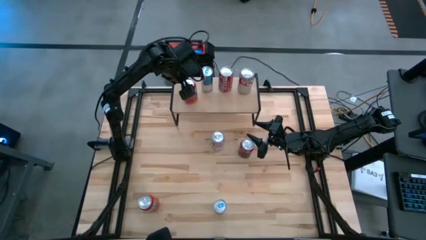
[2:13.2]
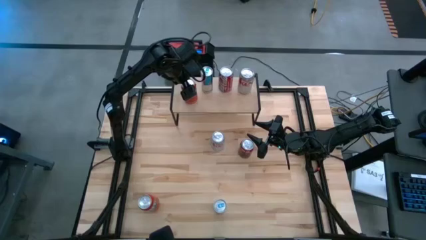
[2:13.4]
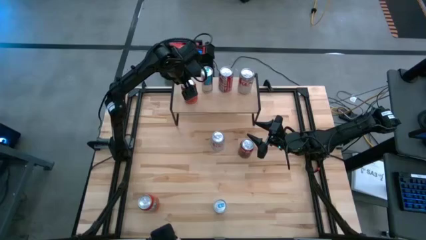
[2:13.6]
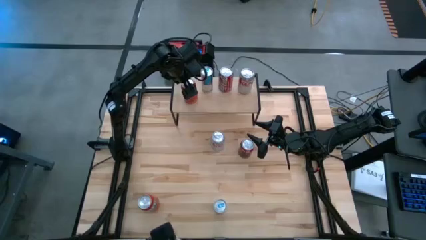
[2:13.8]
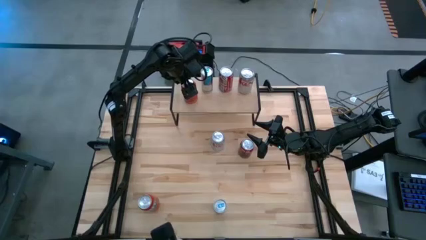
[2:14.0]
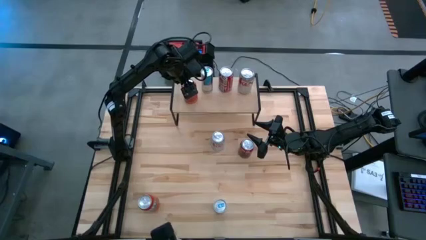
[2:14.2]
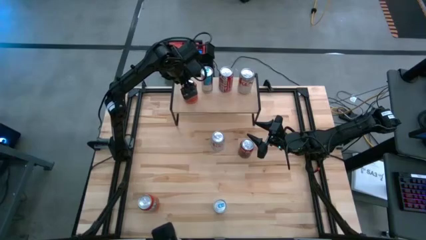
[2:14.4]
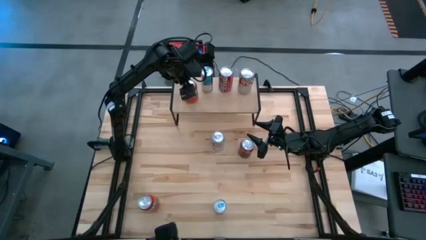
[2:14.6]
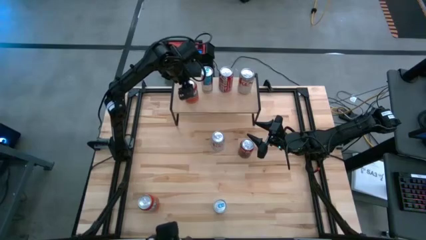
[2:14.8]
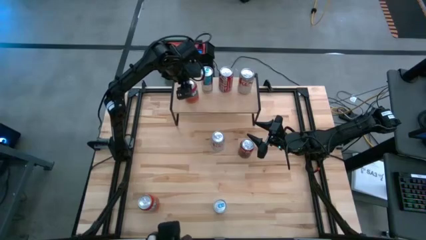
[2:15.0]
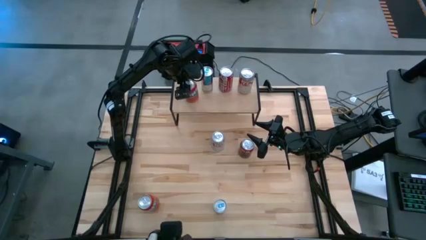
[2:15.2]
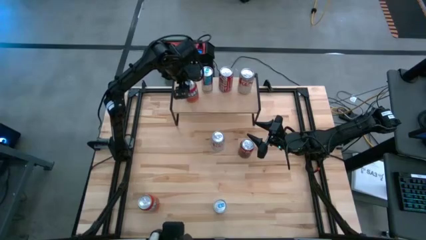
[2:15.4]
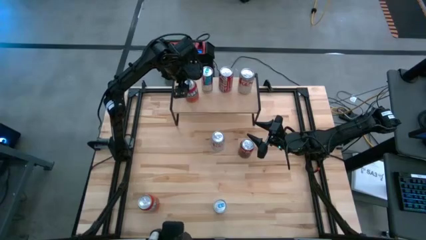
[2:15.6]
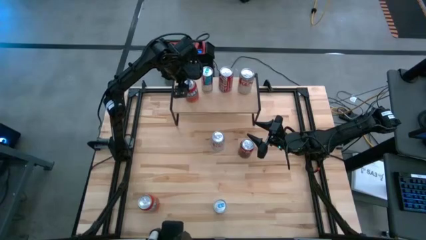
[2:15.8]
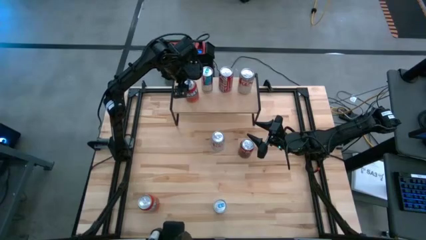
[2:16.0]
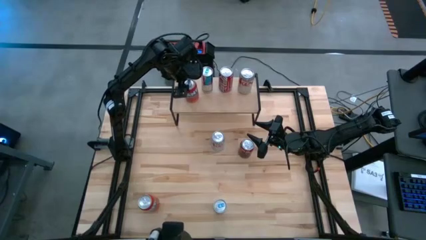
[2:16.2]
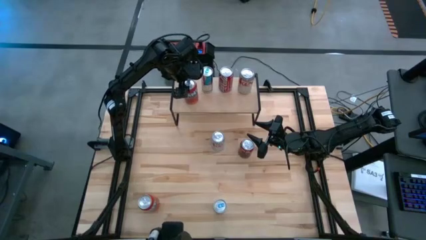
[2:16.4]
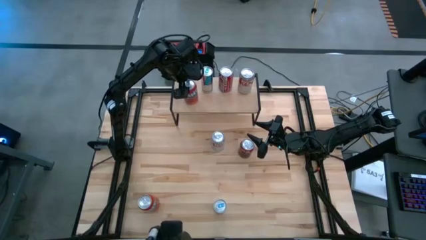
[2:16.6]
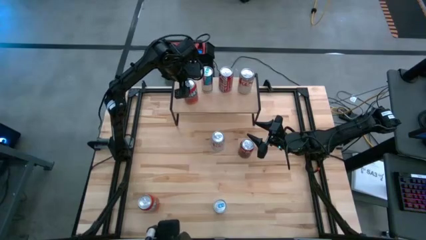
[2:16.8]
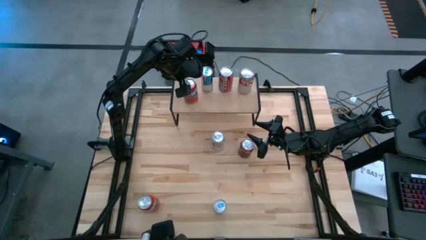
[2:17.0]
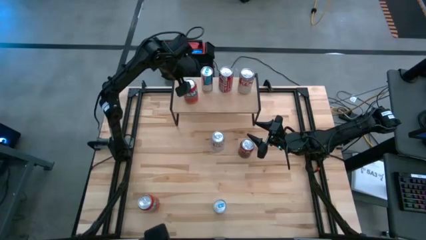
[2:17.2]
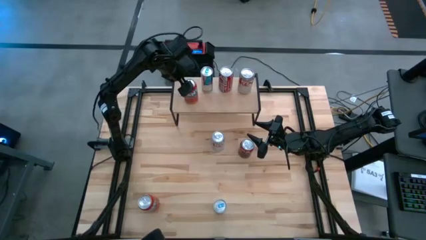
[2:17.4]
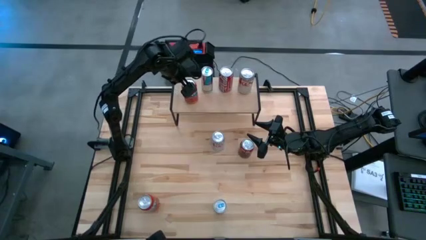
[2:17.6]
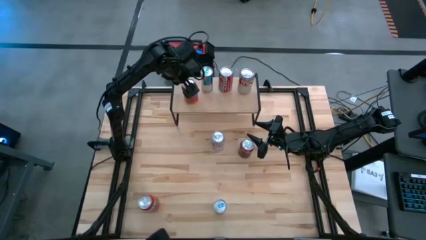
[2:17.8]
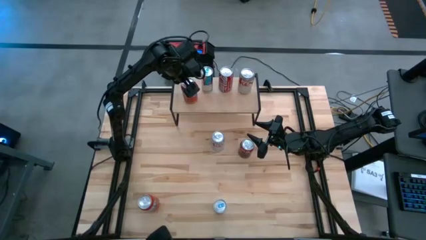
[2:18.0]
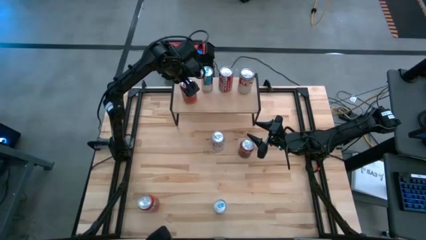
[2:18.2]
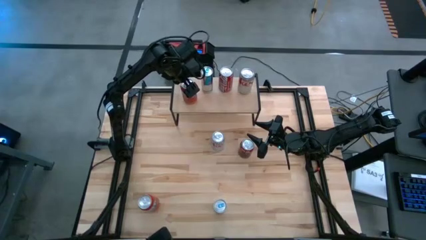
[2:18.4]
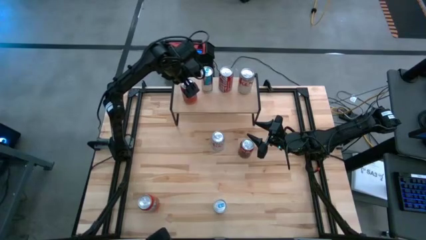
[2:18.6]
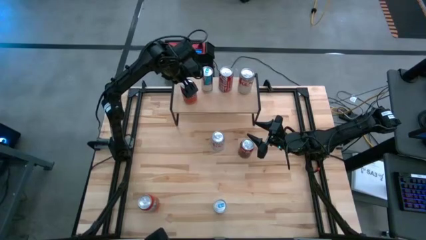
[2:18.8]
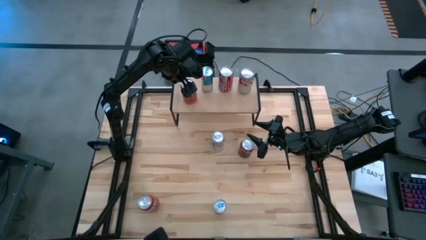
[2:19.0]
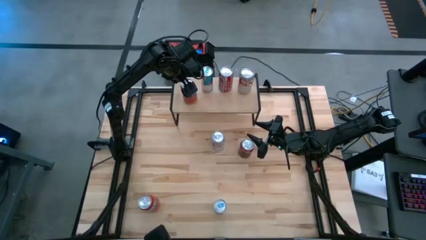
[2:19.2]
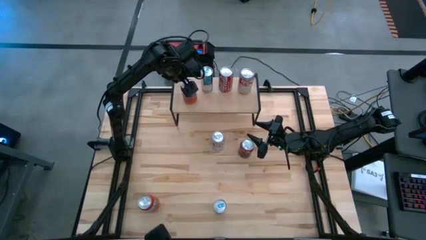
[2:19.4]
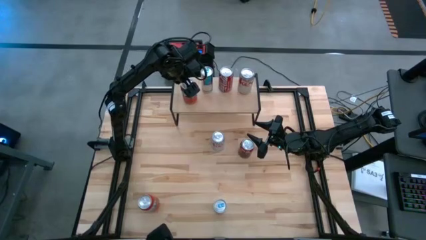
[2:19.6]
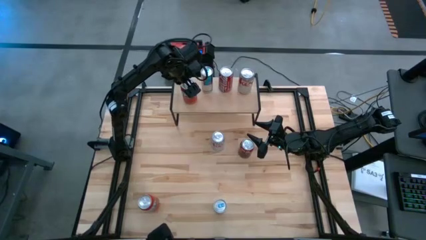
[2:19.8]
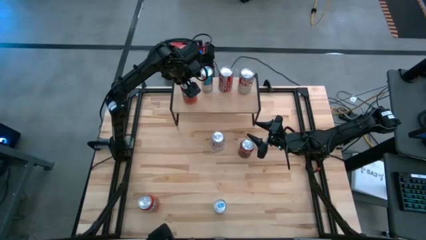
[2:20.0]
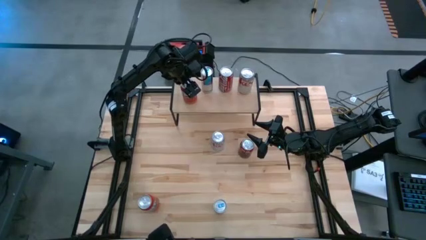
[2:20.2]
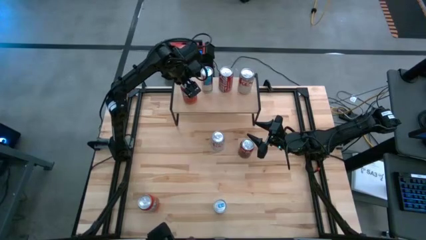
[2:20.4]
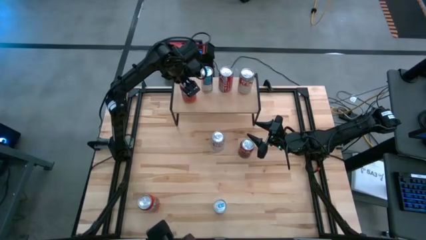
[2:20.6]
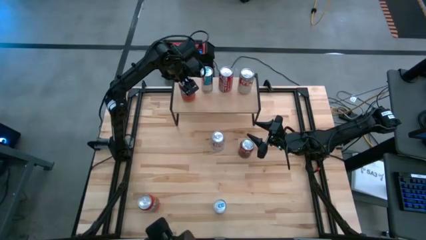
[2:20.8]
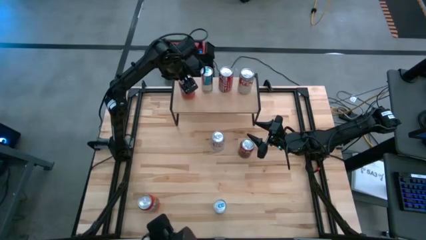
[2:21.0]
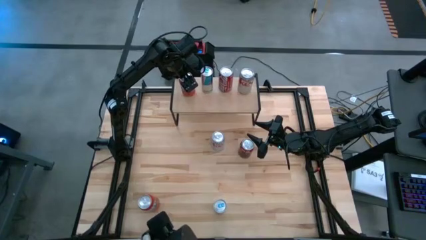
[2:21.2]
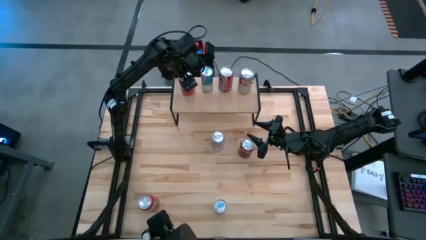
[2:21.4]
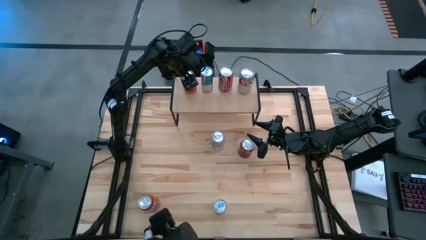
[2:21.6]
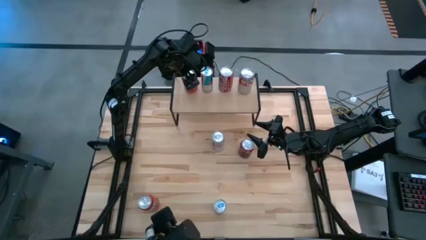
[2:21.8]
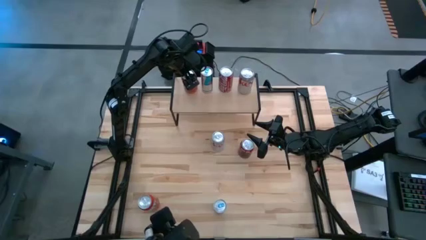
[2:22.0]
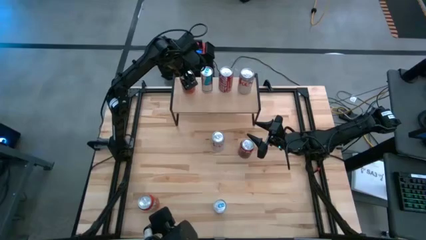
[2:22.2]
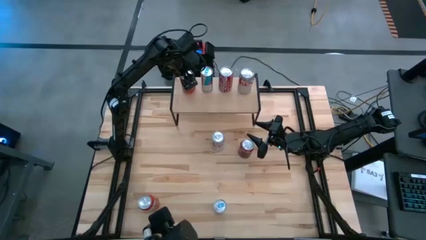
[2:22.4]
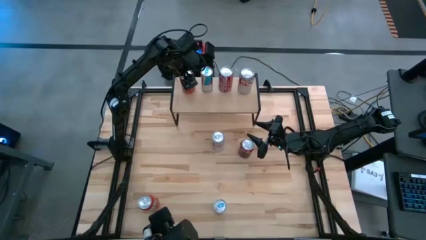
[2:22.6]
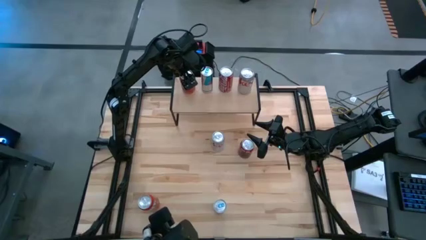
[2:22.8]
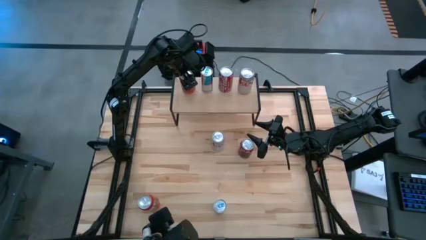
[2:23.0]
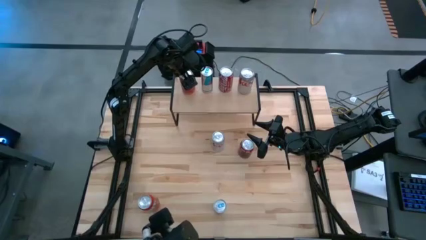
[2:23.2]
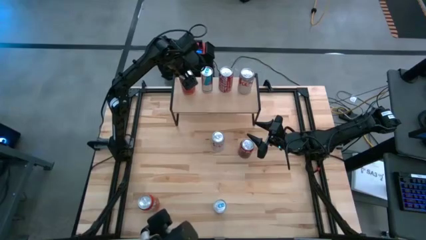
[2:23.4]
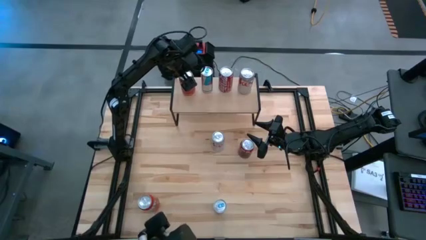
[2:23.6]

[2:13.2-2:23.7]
Task: Place canned beverage on shelf
Put the top red soda can on the shelf
